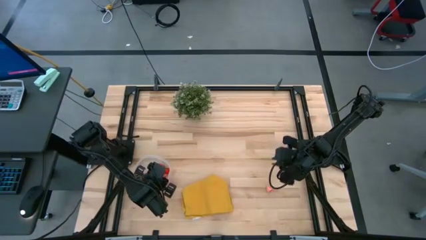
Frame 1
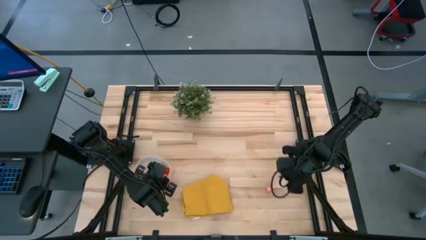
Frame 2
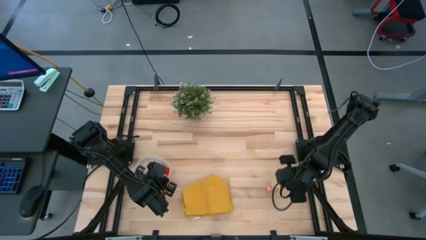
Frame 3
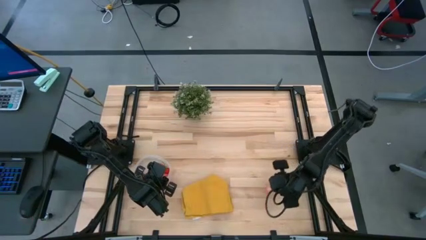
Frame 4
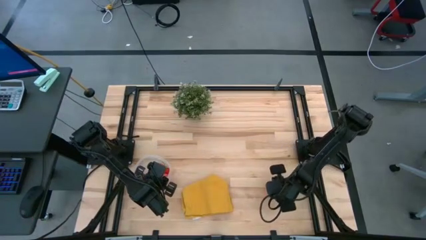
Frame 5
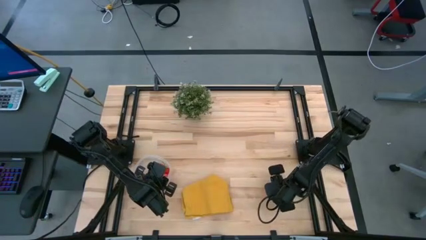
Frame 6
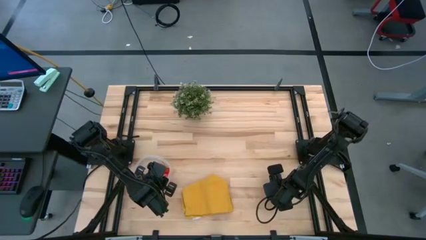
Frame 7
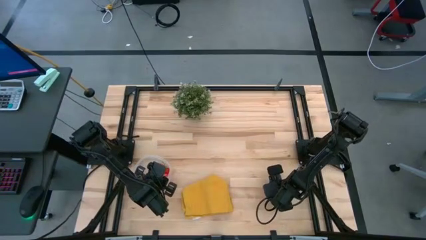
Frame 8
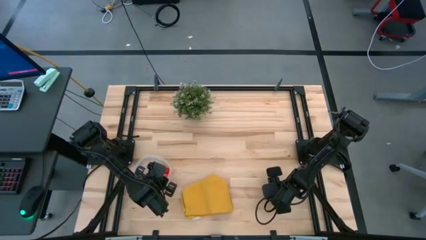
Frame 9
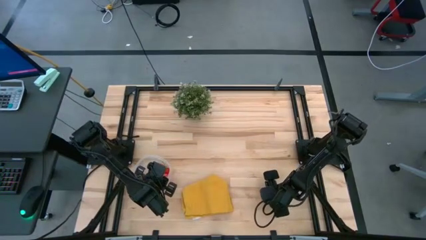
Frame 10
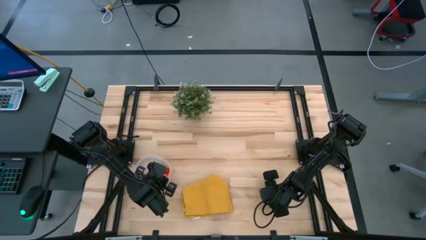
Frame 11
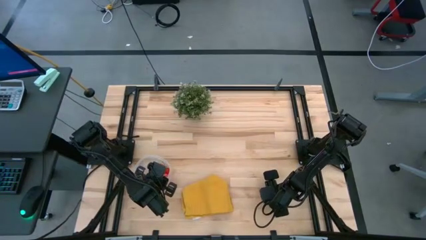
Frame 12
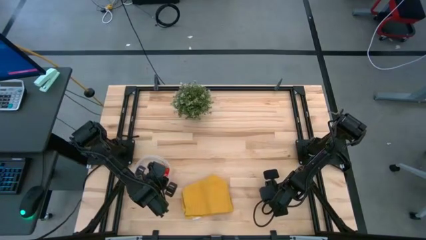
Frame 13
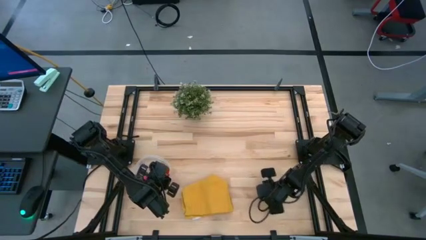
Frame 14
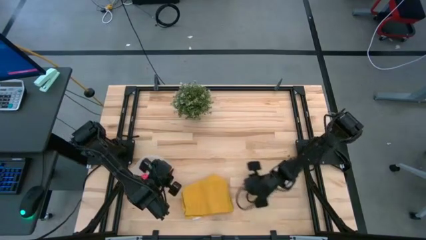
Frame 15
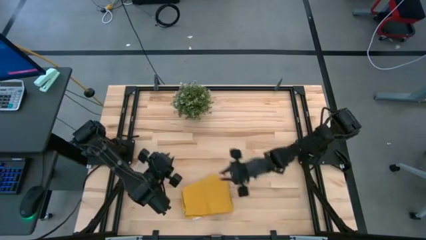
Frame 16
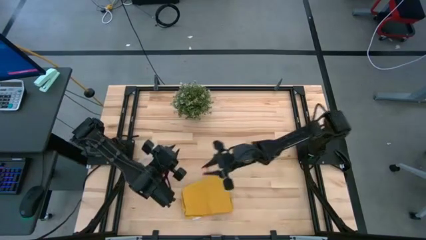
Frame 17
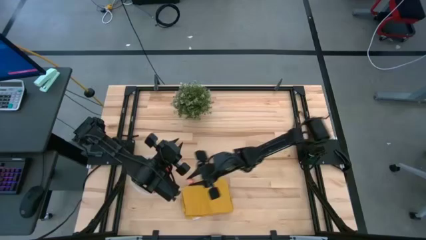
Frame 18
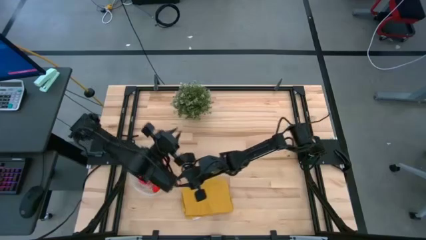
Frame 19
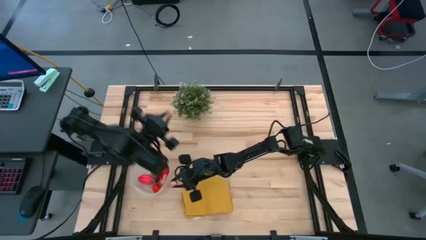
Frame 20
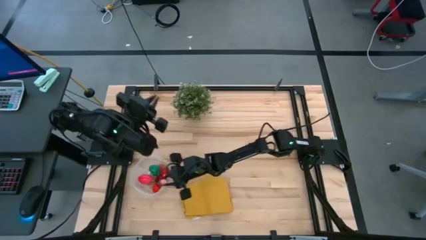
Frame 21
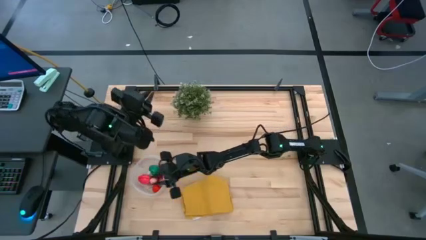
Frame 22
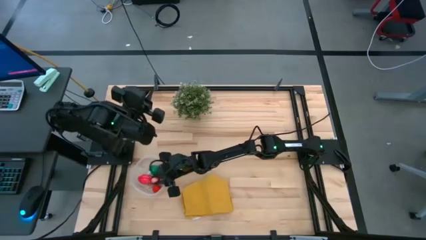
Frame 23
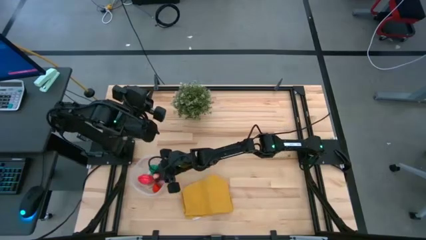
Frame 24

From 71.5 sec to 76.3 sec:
Task: Pick and placing Produce into tupperware
Put the peach into the transparent bin

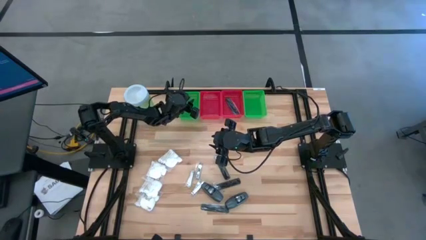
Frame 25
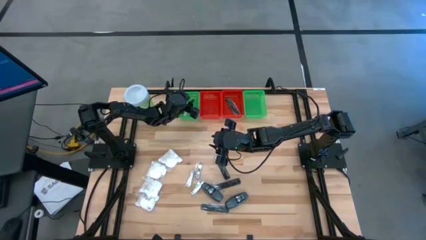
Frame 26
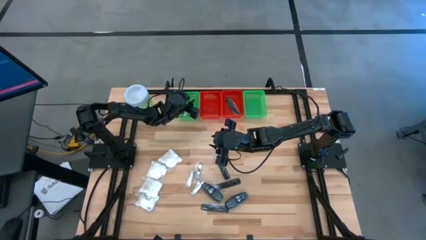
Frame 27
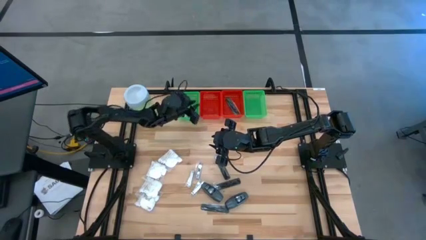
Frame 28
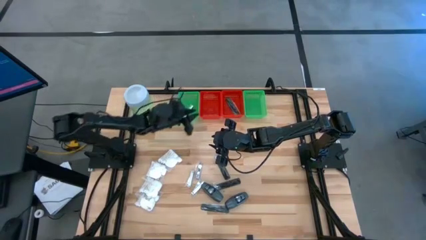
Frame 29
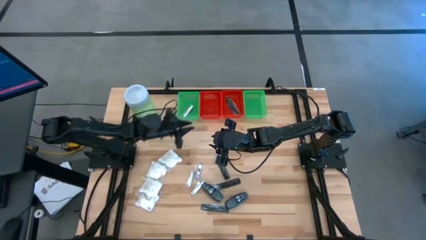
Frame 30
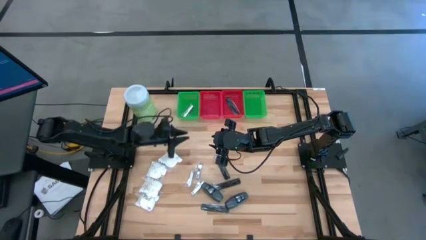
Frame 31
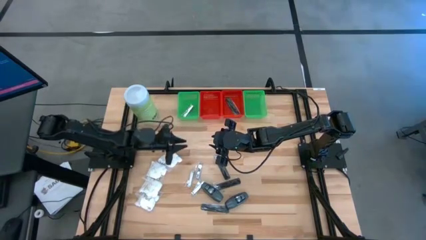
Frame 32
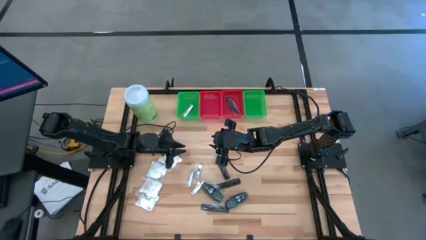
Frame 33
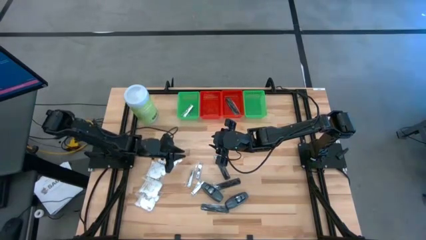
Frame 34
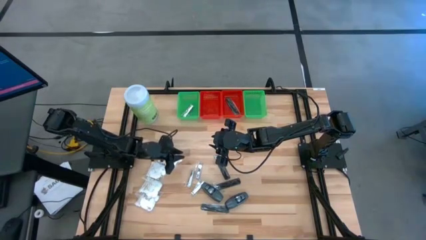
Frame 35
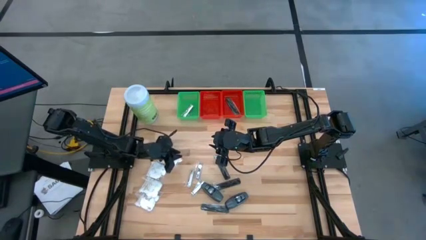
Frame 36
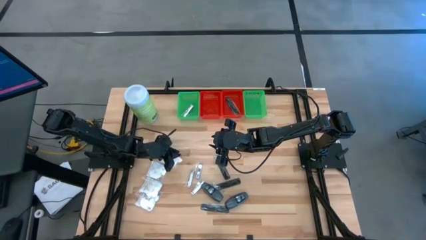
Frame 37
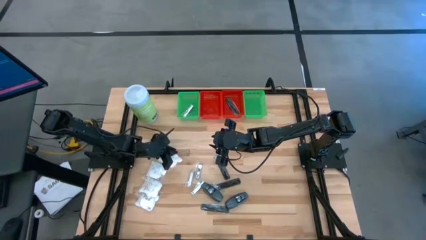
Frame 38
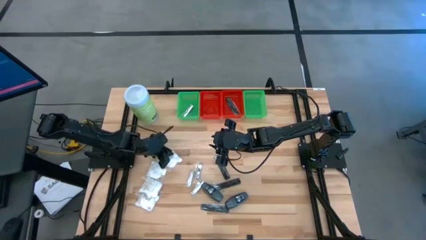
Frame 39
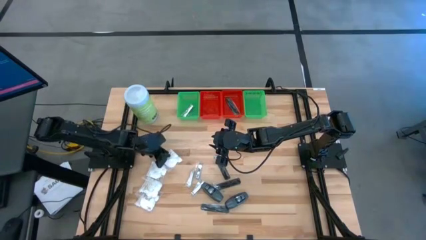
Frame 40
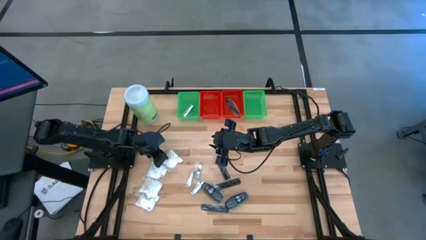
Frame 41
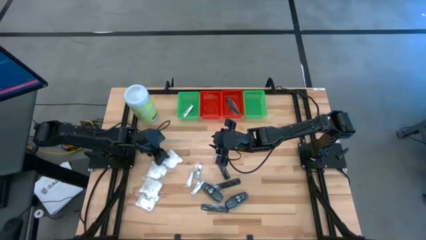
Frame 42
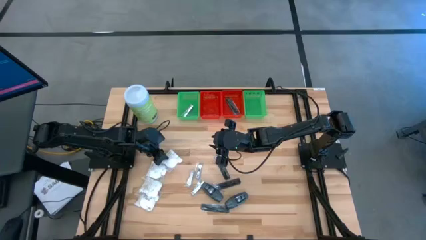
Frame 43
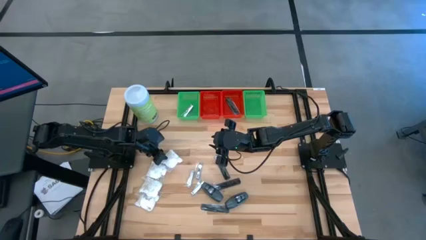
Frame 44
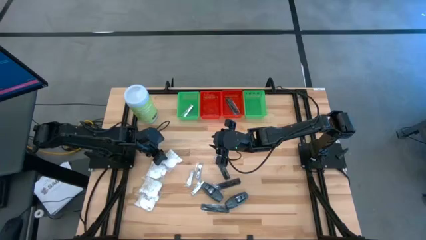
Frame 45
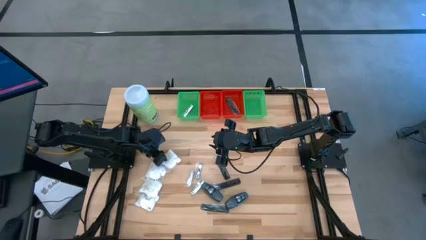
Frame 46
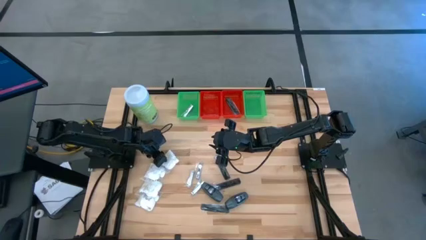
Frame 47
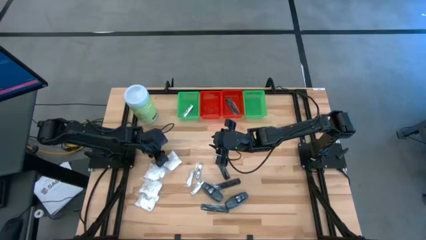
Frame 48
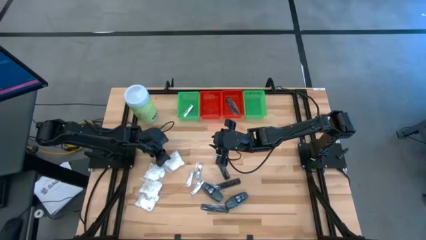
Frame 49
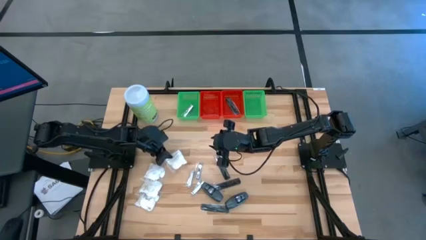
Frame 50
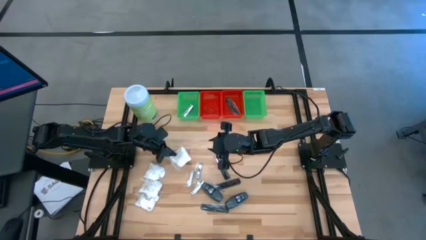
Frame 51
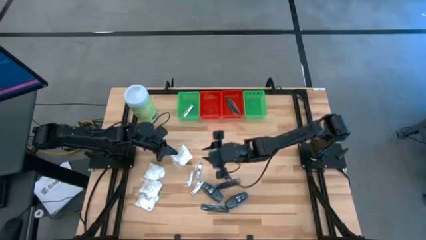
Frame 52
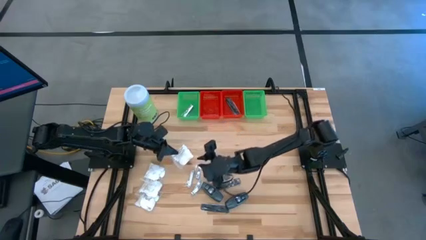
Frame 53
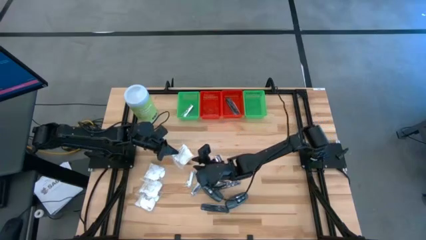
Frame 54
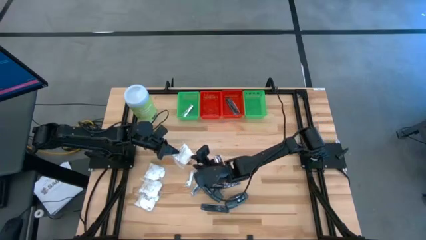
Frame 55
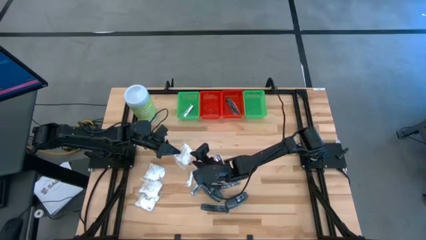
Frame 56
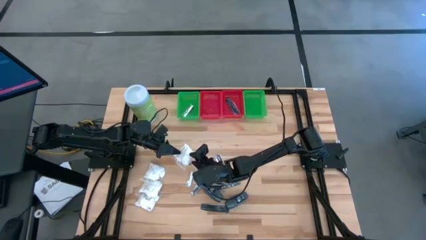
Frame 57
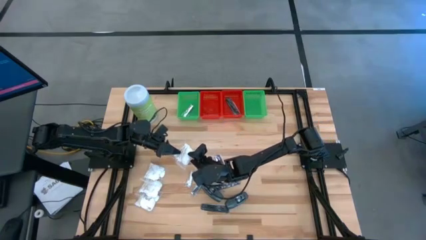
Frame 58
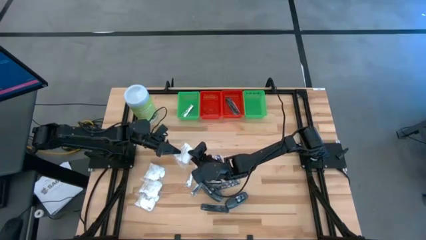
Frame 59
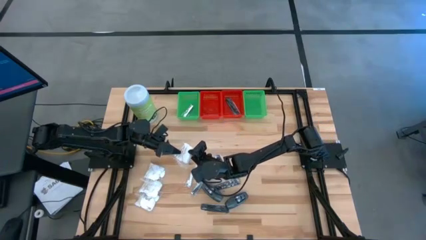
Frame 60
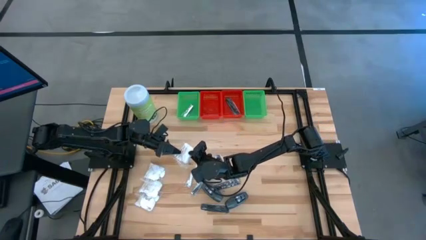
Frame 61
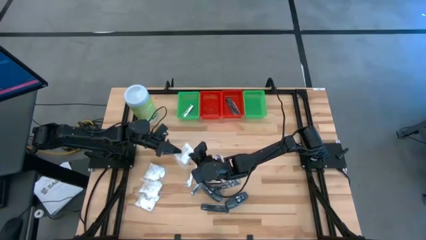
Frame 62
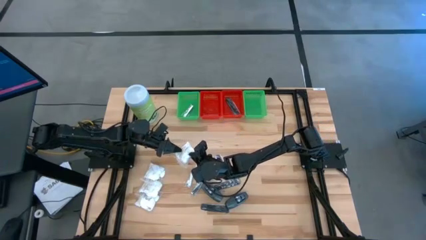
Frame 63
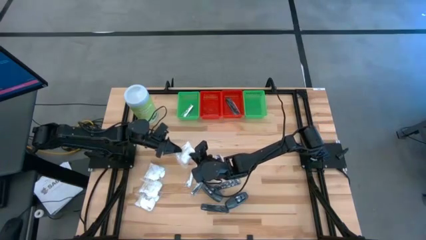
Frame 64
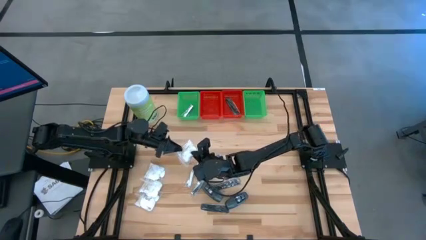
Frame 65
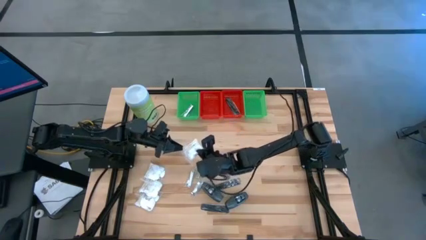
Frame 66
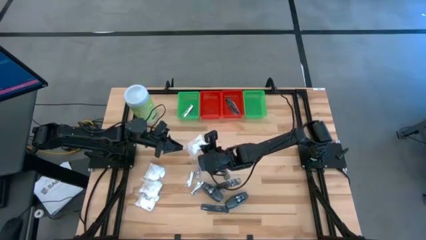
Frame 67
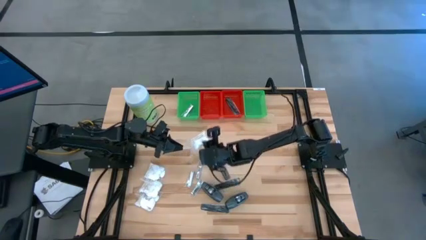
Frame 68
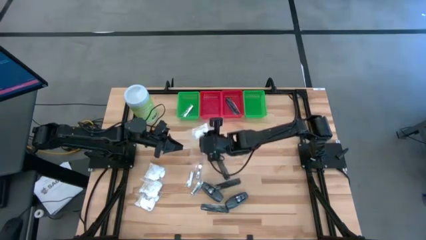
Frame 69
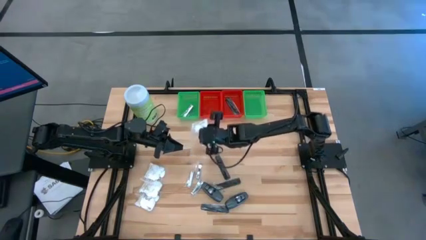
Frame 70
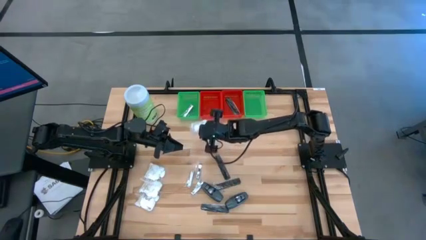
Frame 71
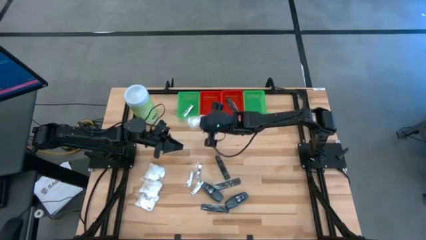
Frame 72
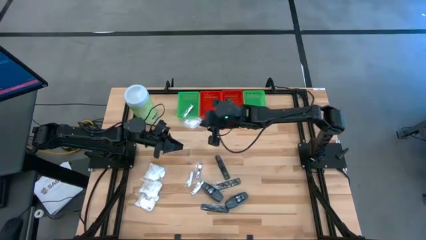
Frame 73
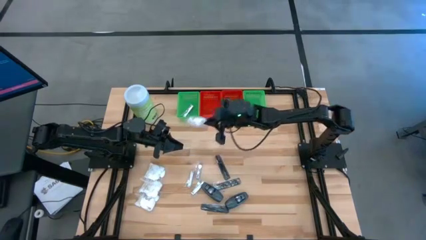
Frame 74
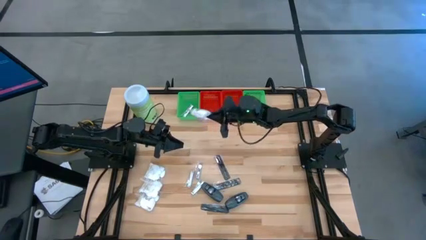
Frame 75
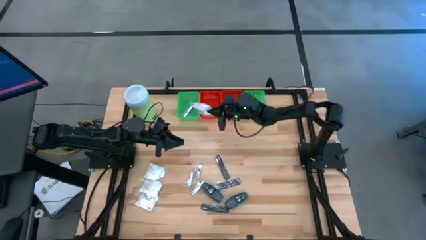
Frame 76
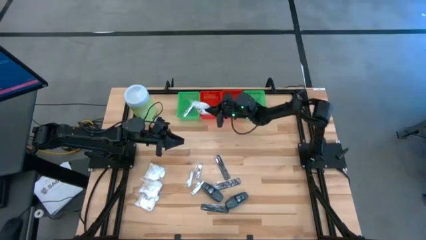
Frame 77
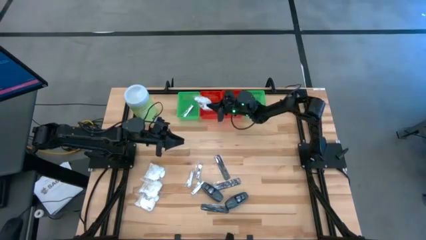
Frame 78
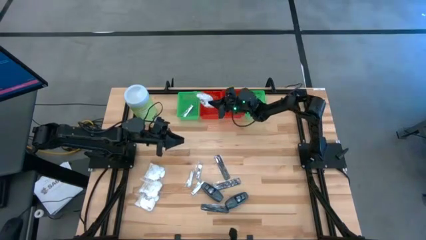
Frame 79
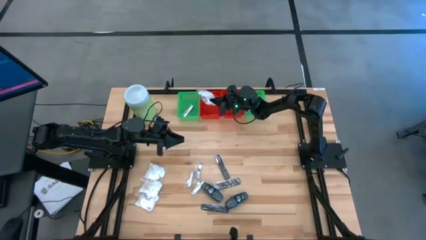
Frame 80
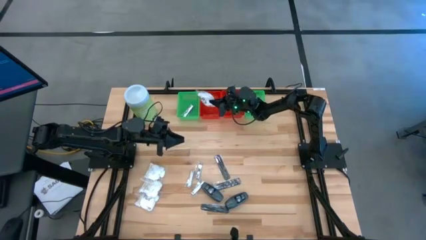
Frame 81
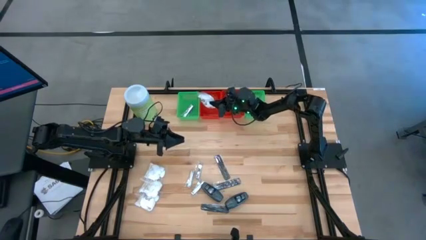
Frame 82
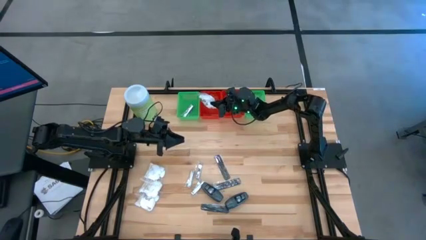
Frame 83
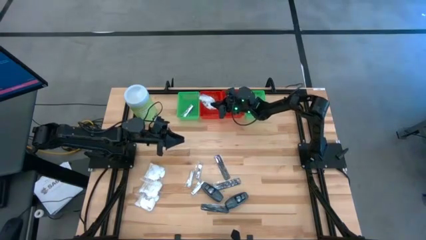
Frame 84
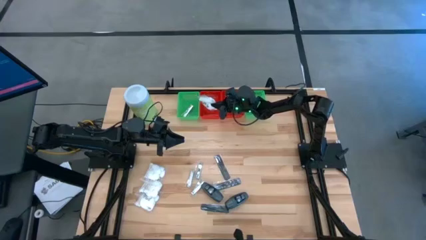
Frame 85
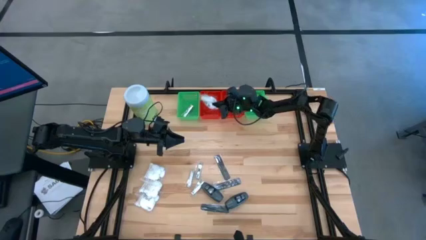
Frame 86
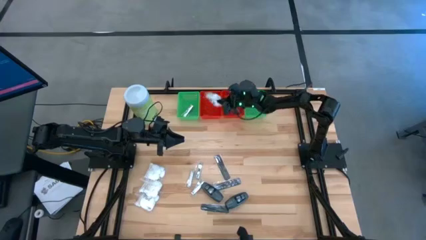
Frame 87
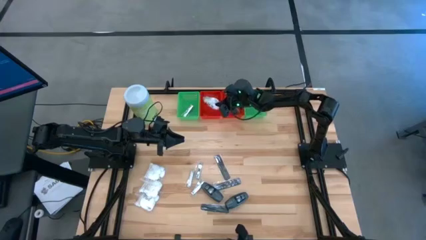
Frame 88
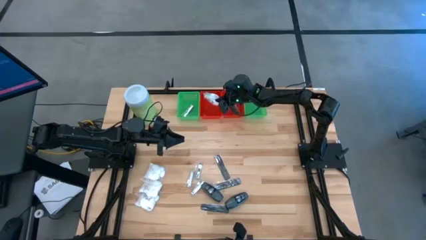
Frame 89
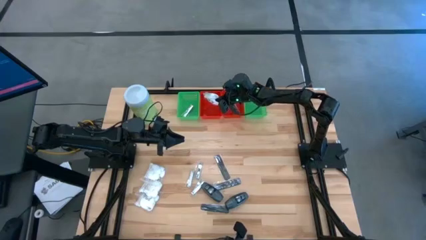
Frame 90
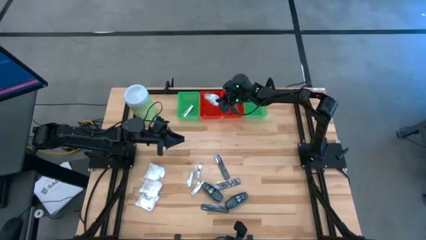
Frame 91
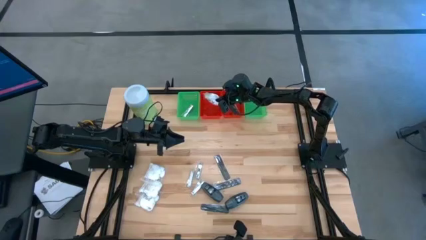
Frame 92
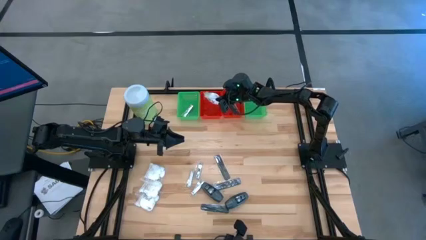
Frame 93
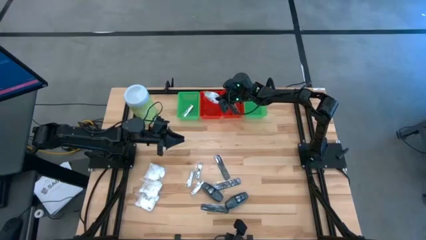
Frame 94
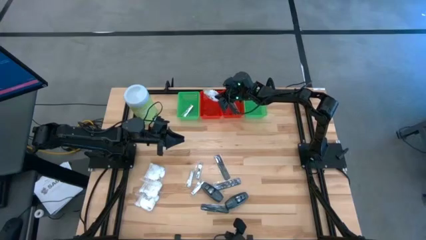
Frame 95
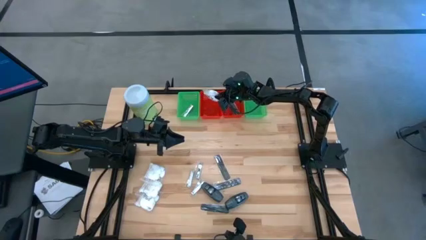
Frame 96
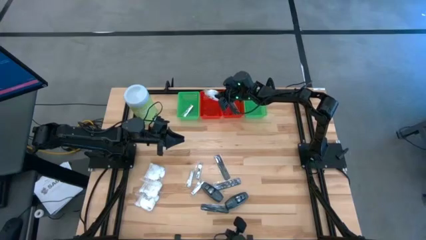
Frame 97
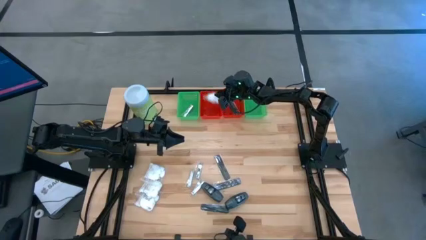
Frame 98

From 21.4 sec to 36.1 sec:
Task: Pick & Place Travel size toiletries
Put the white cotton pack into the left red bin
